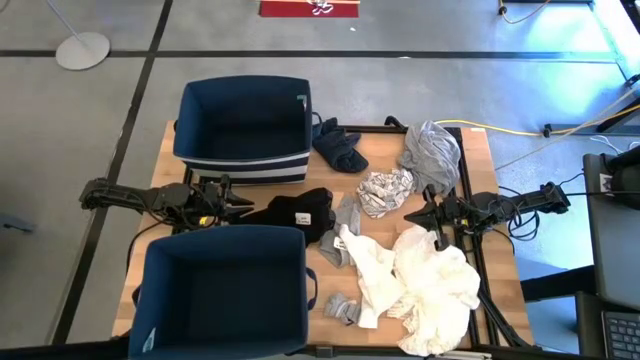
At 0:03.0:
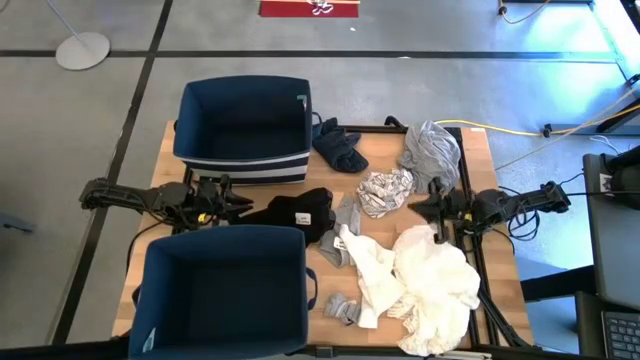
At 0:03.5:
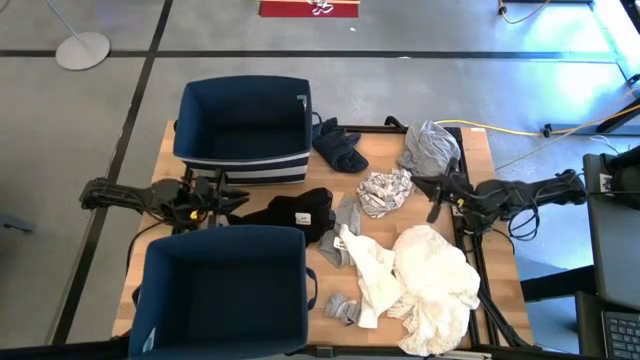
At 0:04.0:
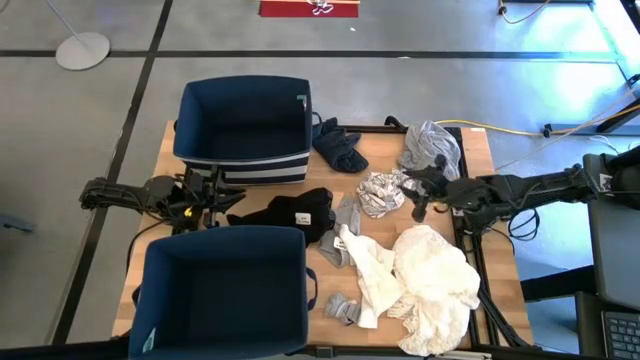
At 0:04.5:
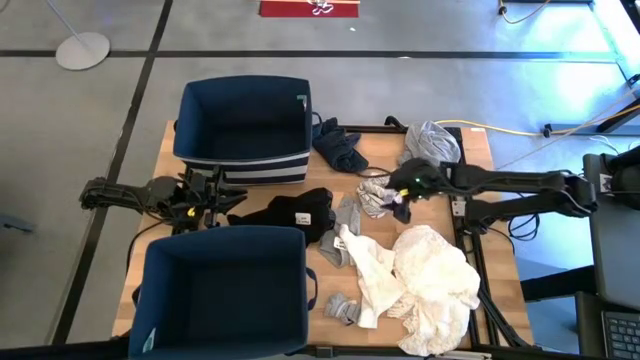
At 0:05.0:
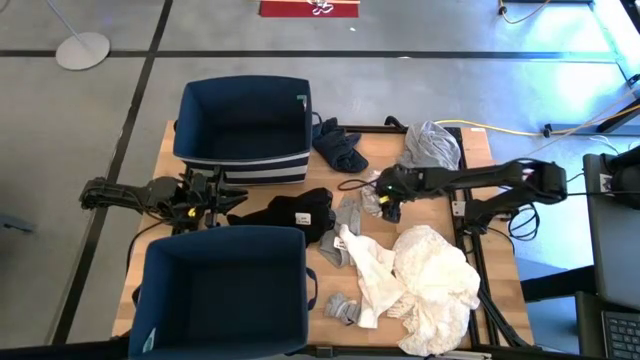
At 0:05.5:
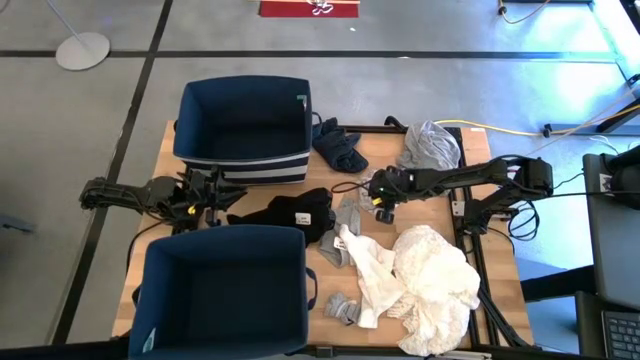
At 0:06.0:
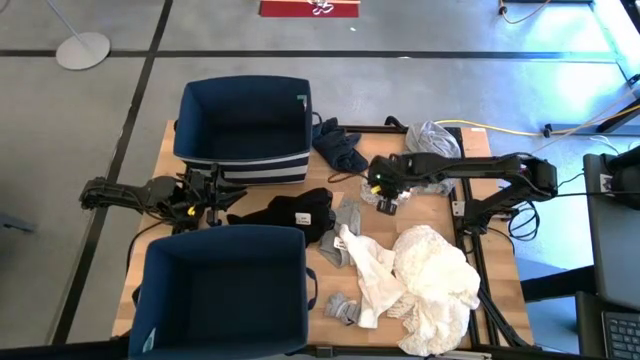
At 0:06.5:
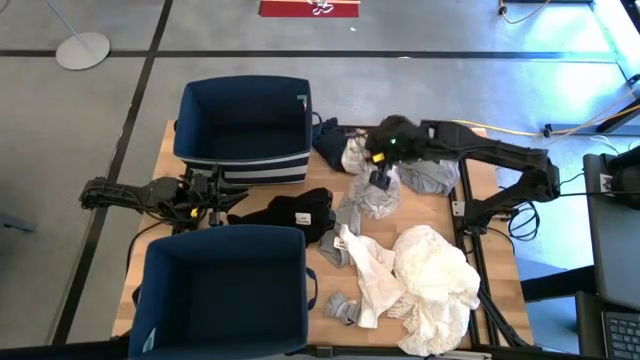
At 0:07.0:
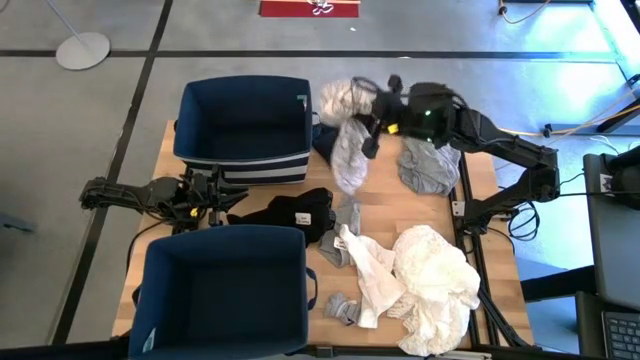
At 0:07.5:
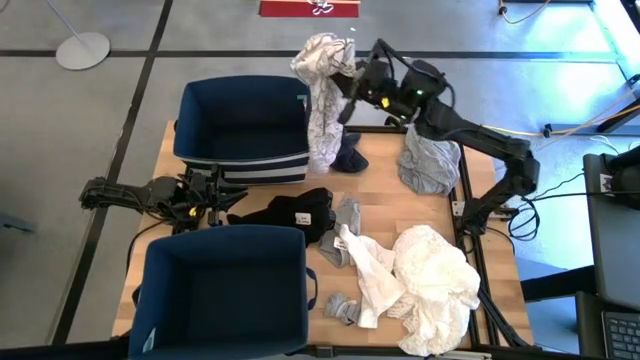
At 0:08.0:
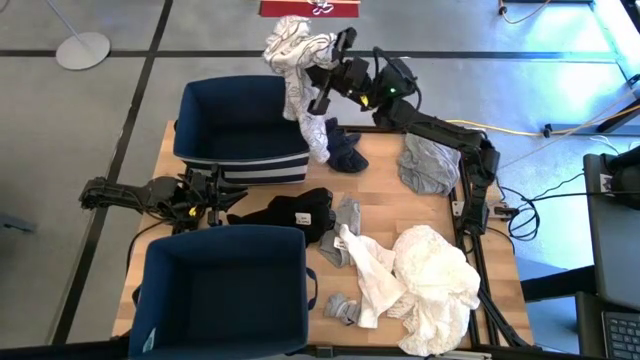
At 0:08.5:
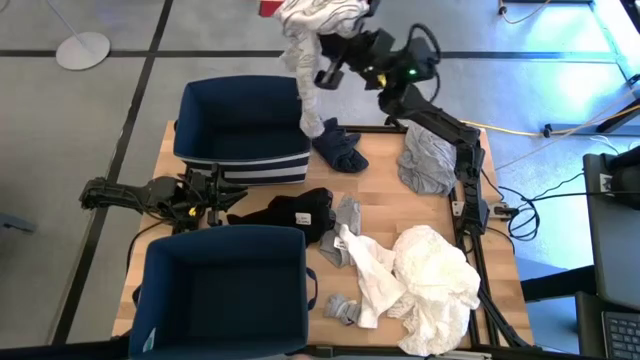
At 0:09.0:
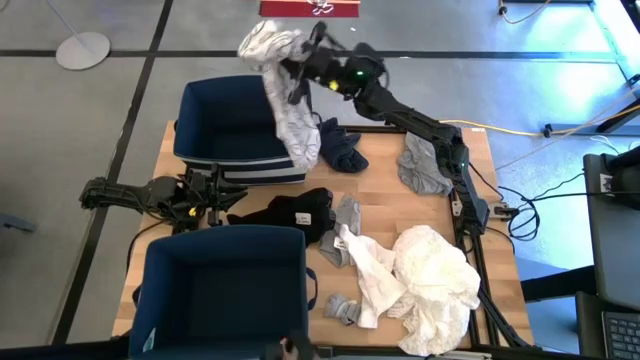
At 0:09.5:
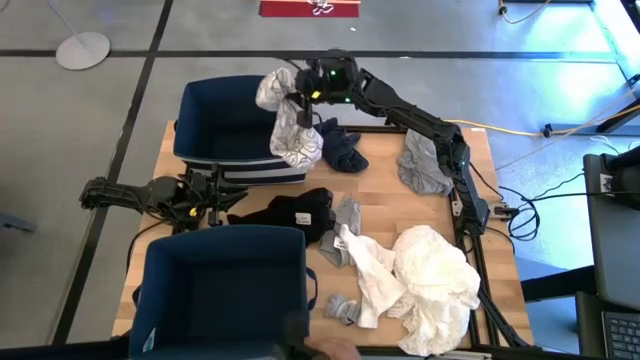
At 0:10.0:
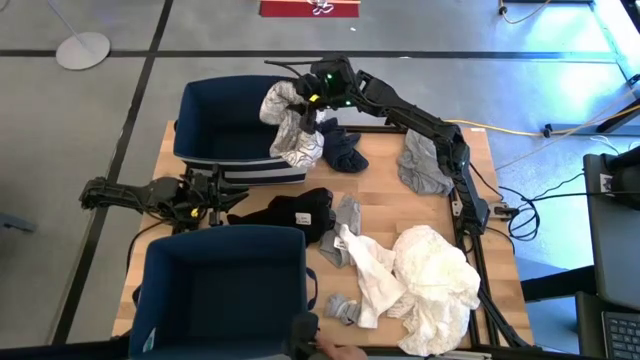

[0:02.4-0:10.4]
Task: Sort clothes
Put the white and black shirt into the top blue laundry organizer

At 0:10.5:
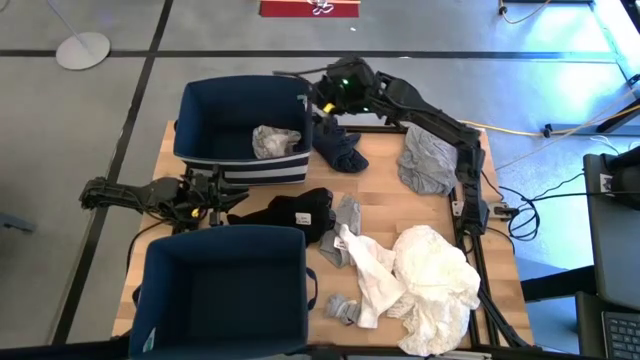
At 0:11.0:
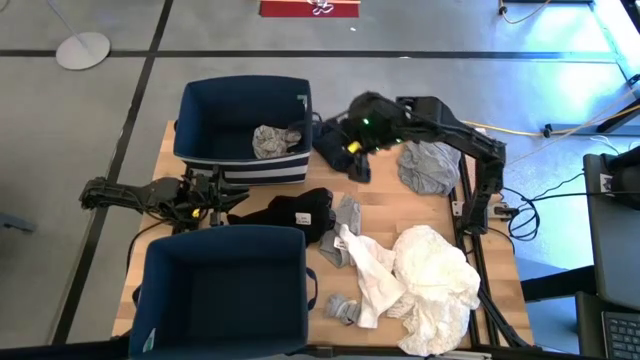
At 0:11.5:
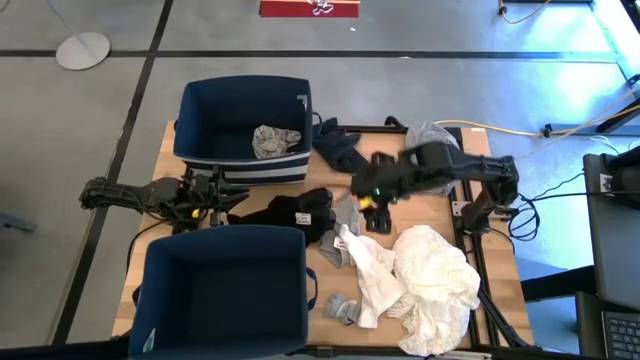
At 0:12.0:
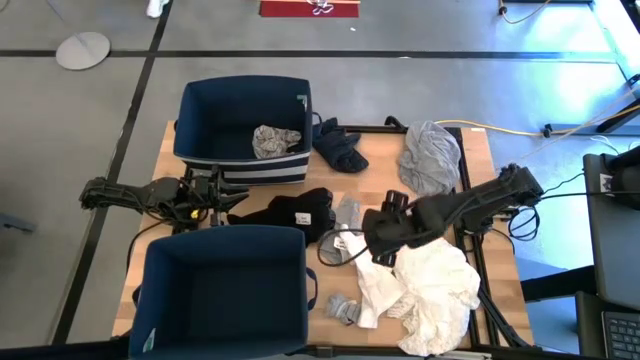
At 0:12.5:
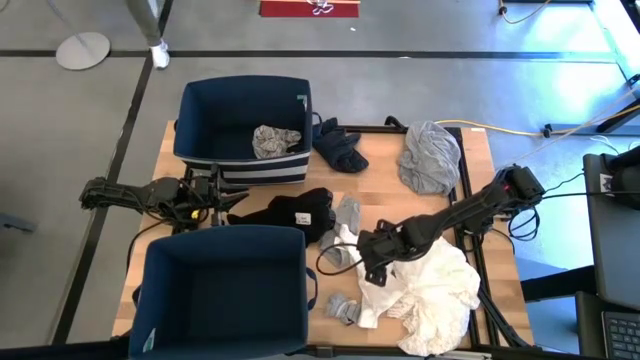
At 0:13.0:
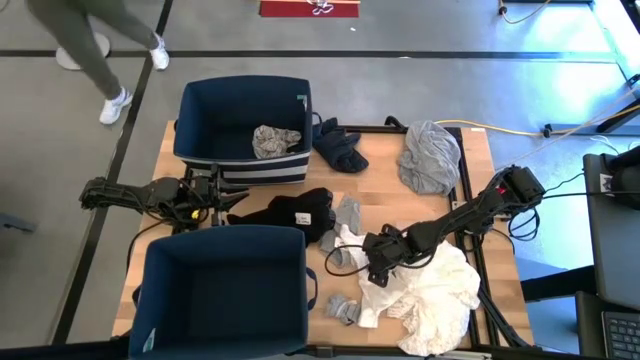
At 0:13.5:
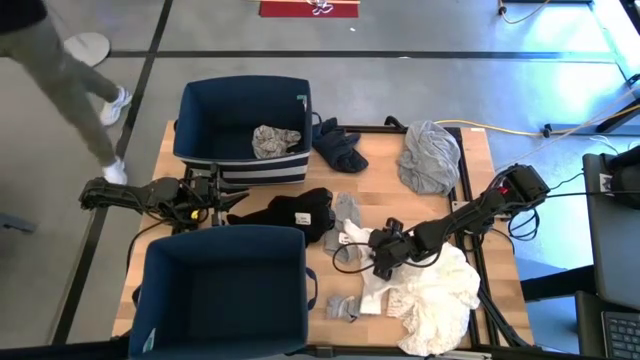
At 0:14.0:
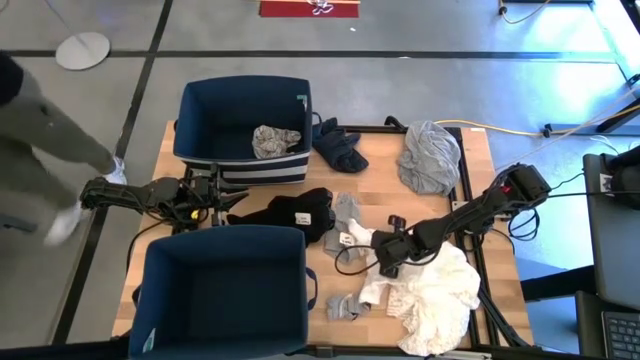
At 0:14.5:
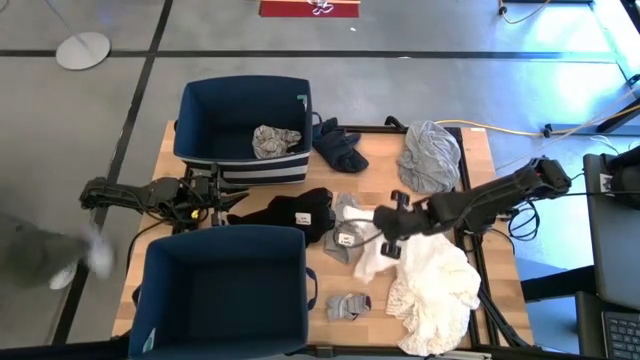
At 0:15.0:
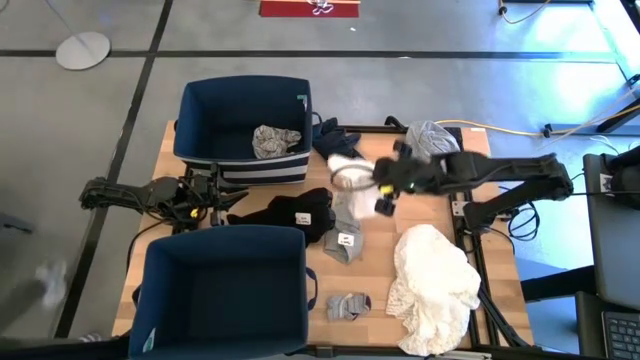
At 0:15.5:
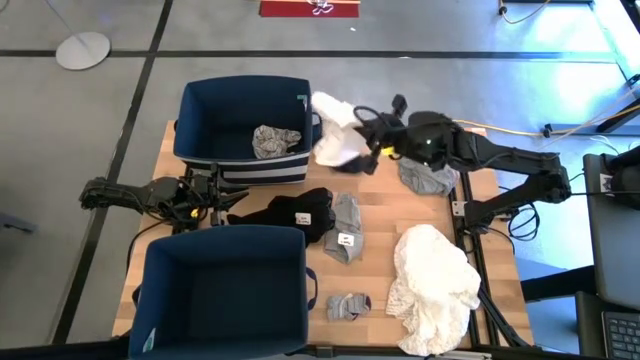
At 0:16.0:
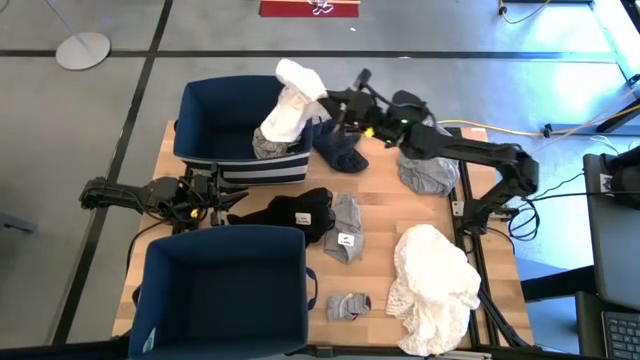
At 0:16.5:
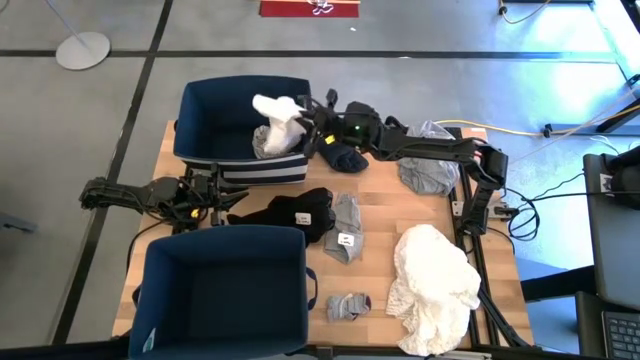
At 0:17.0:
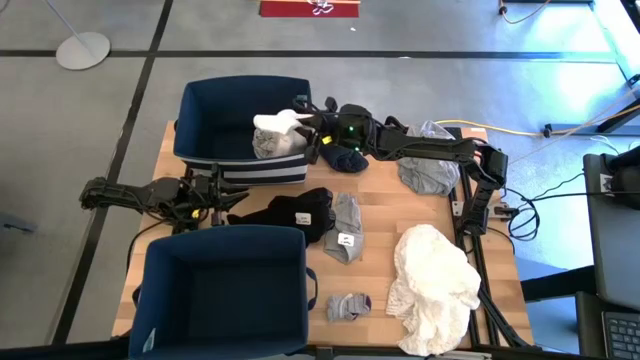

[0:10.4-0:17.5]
Put the white shorts into the top blue laundry organizer

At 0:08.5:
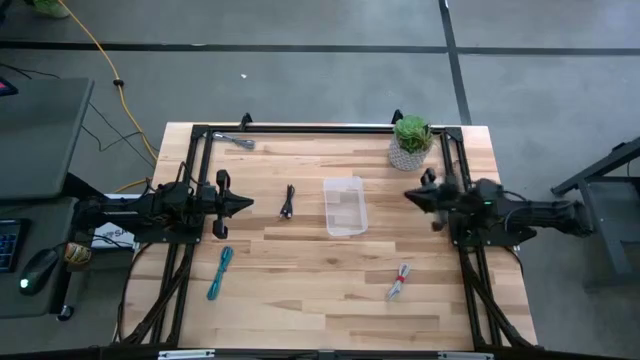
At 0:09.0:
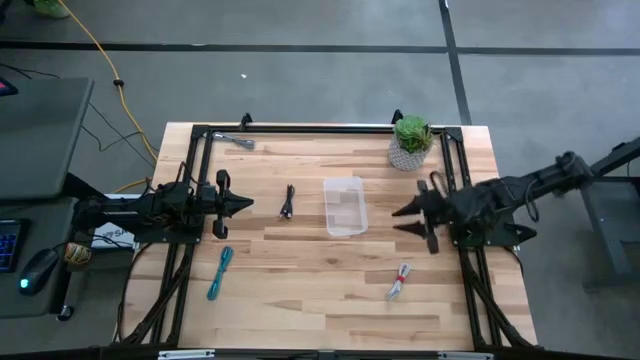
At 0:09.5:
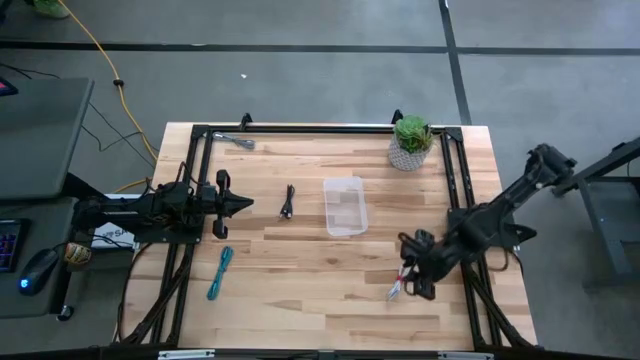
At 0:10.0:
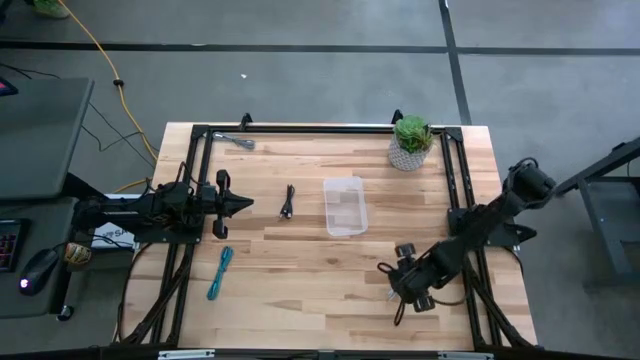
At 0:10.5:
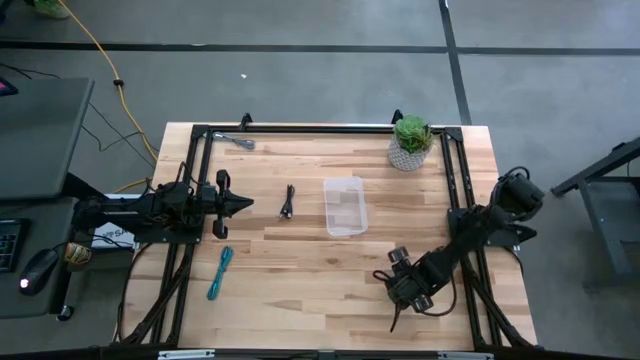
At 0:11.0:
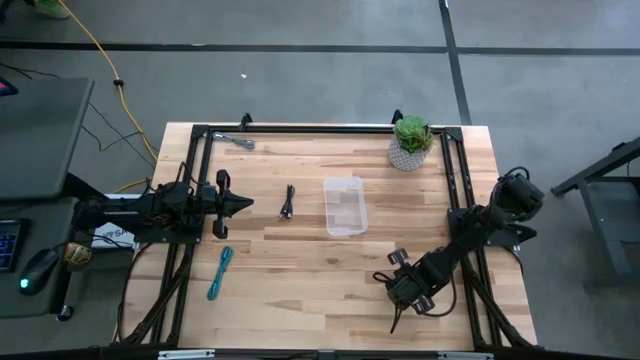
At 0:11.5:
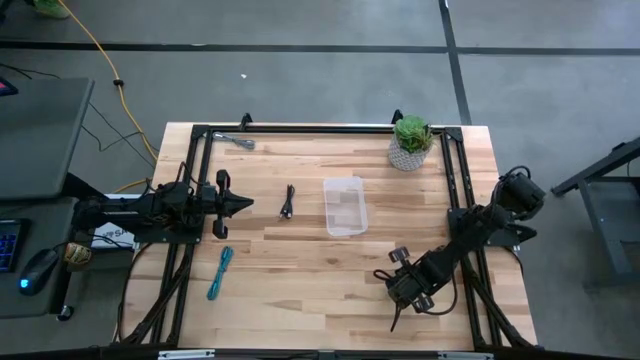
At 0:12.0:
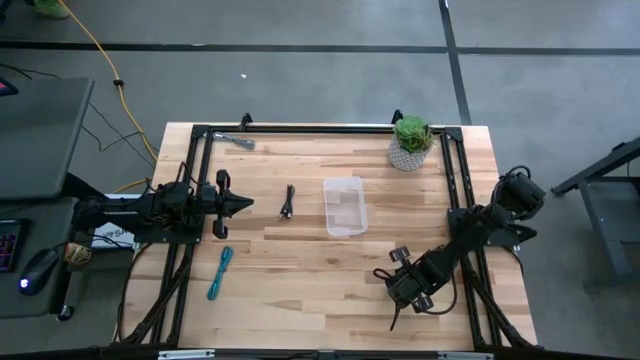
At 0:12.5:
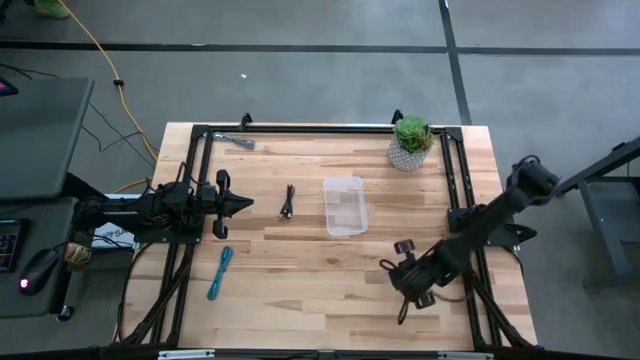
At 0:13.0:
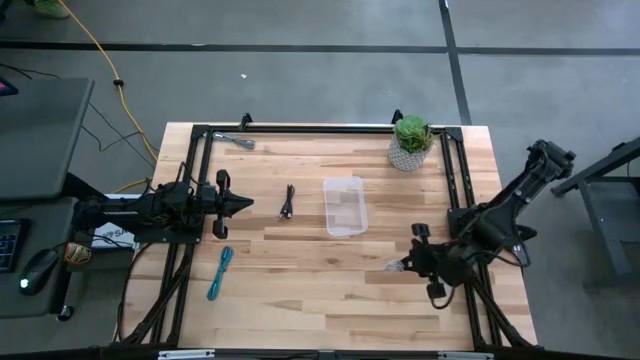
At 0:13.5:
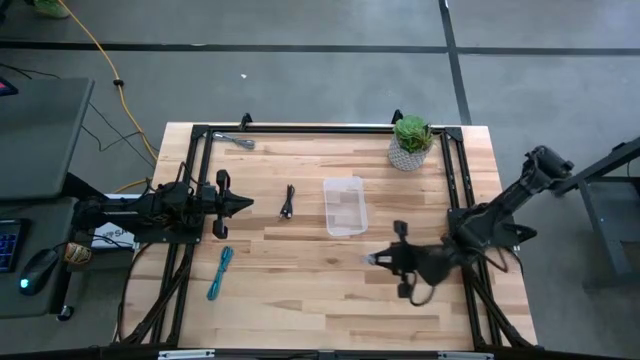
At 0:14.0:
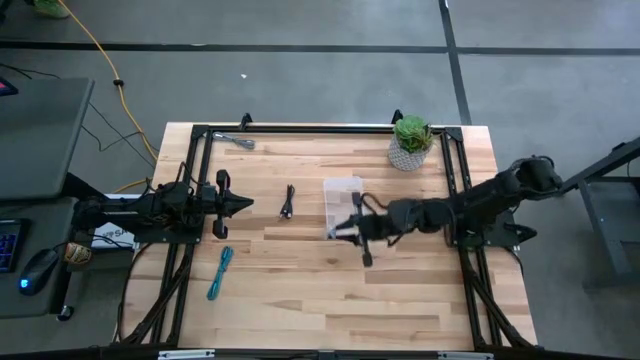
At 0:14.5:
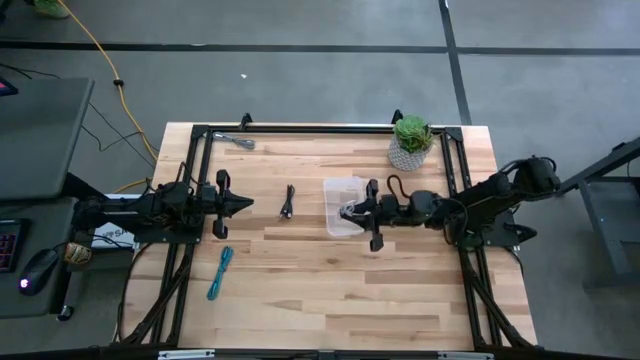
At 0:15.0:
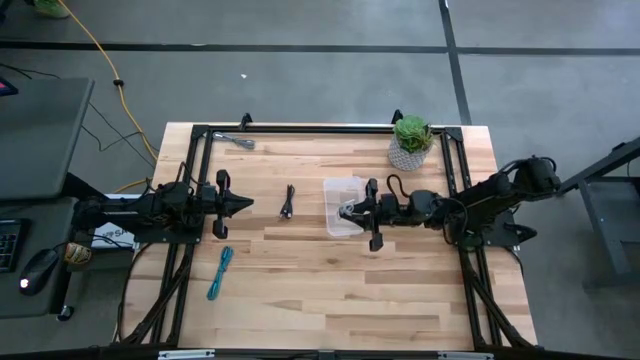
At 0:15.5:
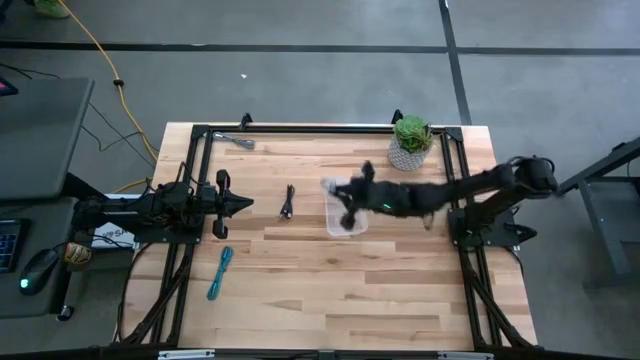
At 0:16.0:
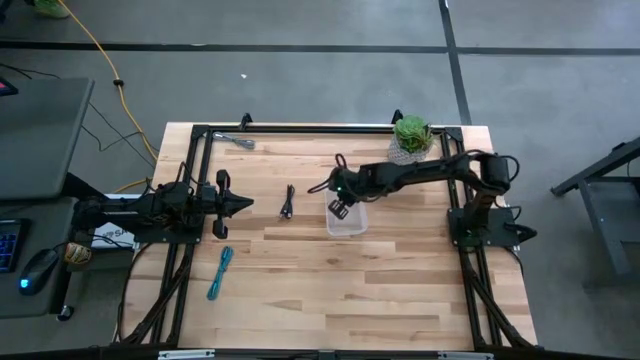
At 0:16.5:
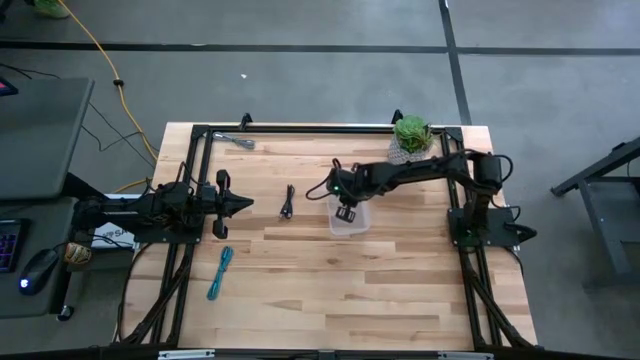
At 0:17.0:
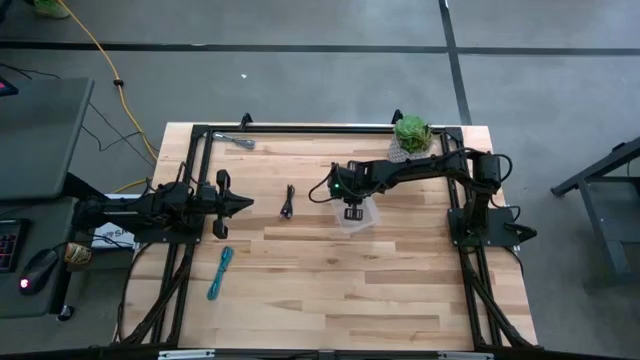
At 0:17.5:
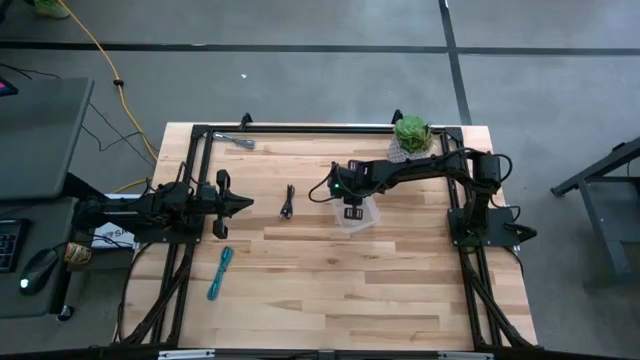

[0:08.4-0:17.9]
Task: Pick and place USB-C Cables
Put the white charger cable into the transparent bin
